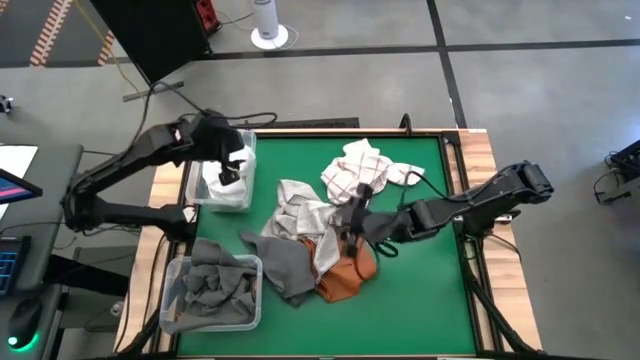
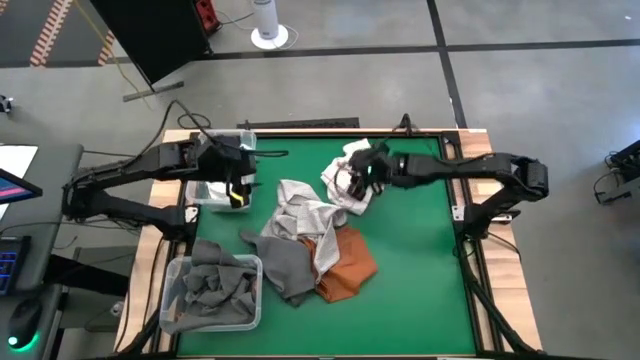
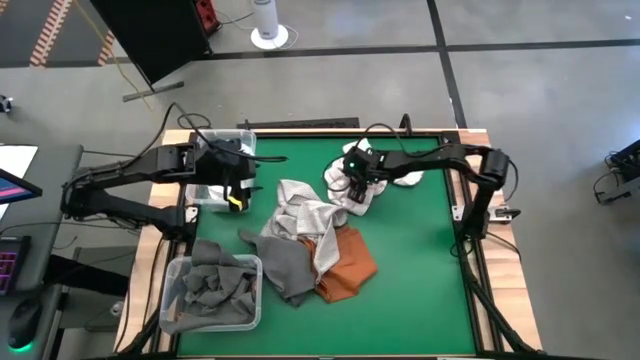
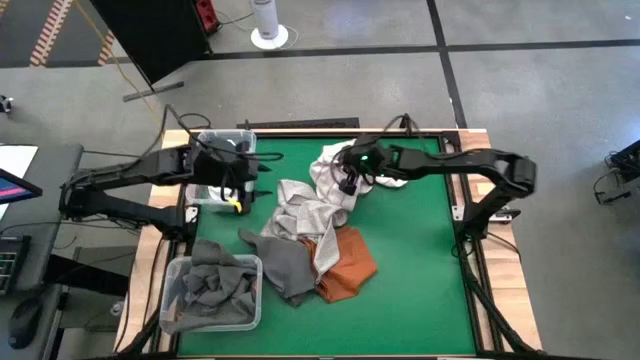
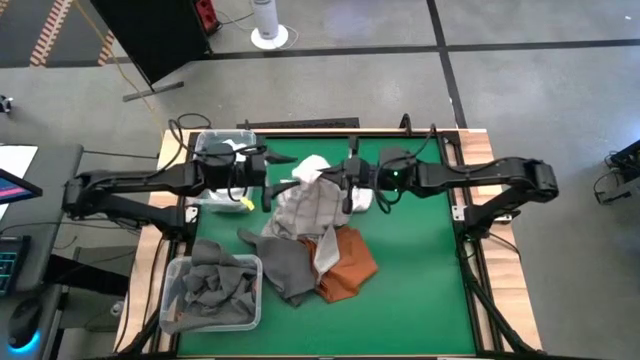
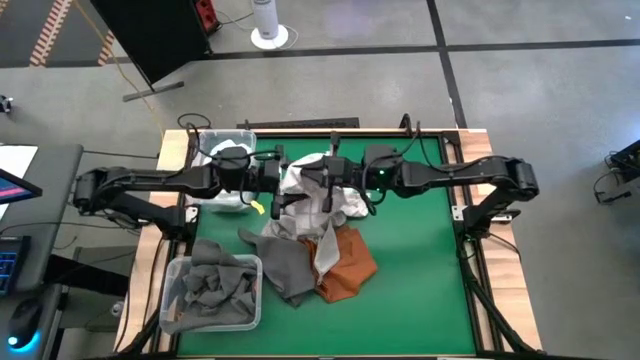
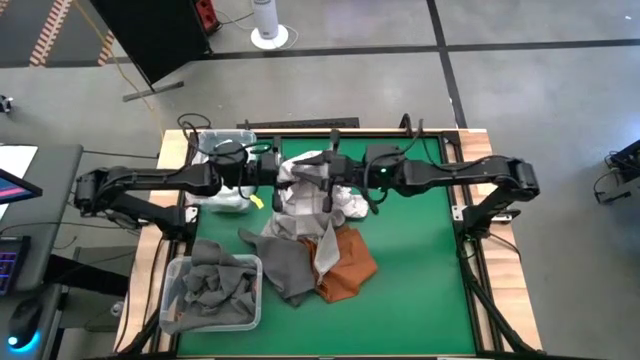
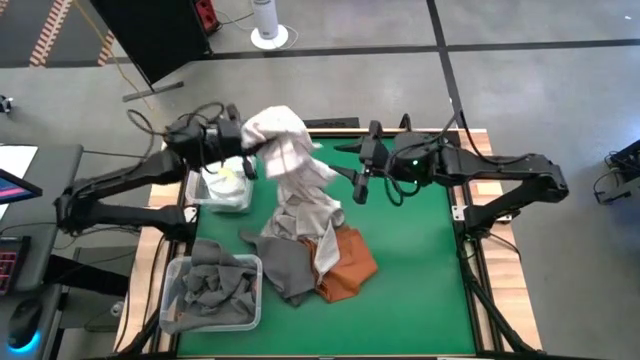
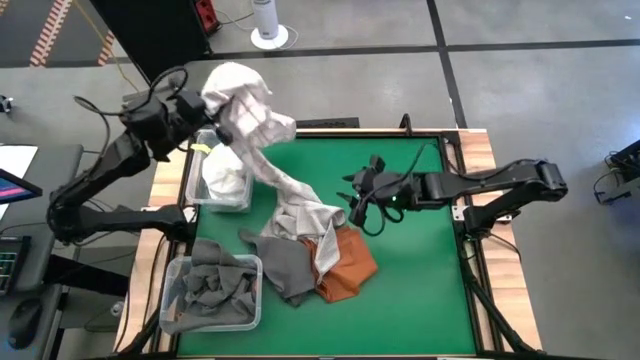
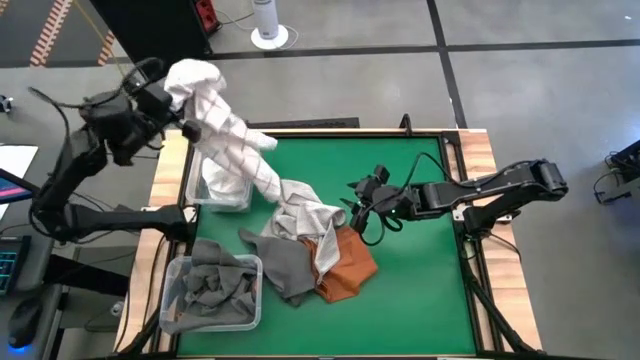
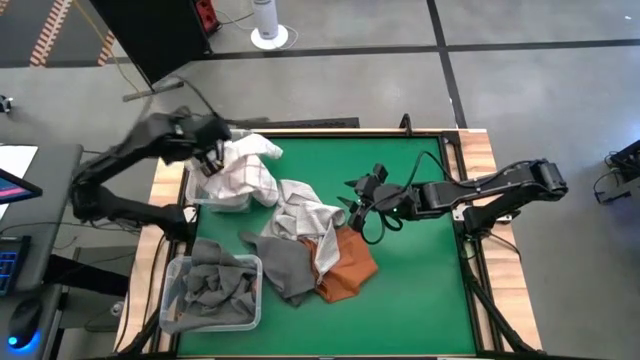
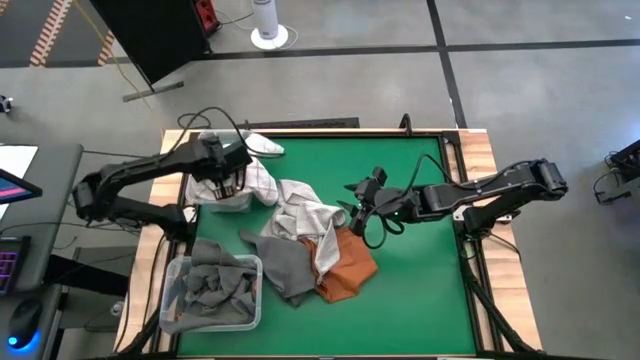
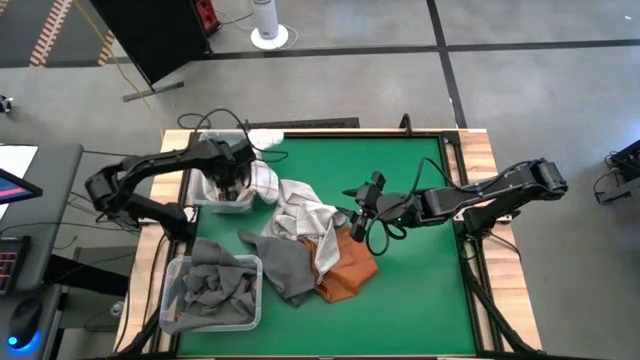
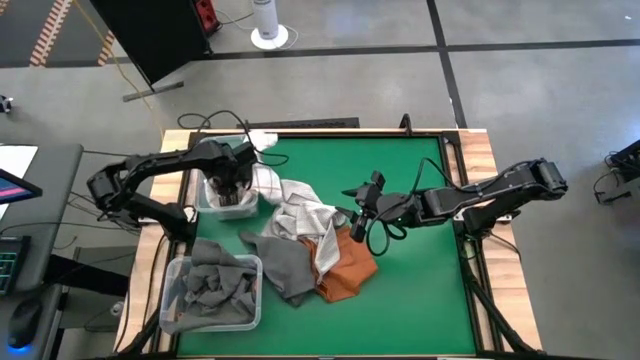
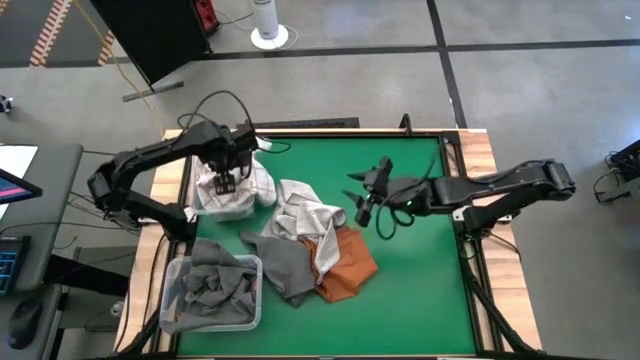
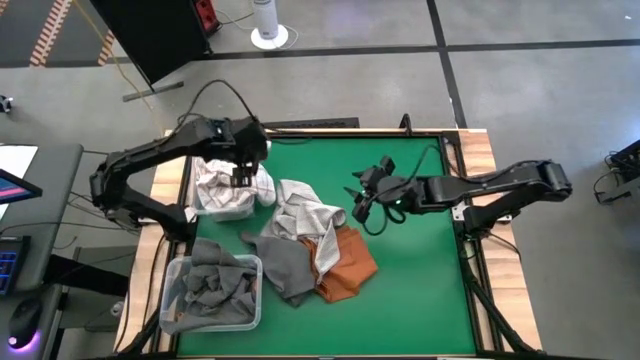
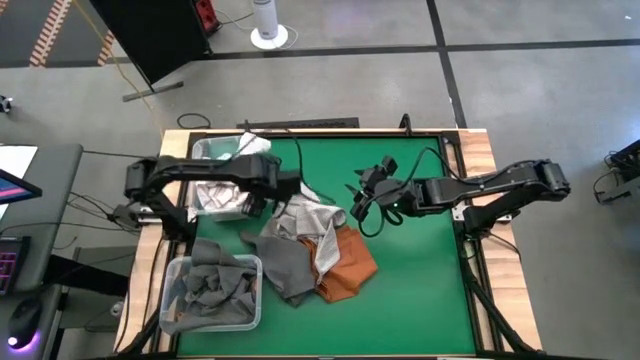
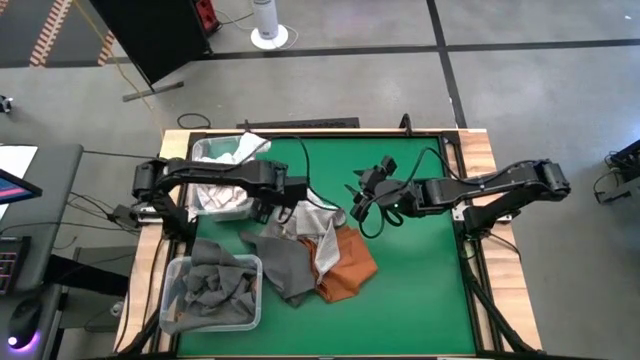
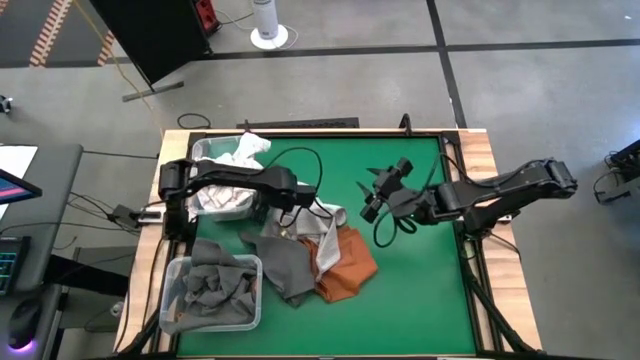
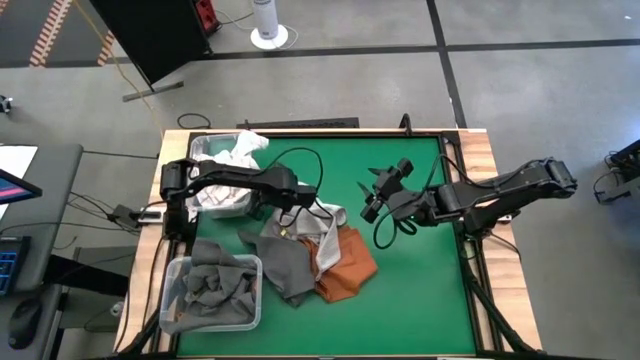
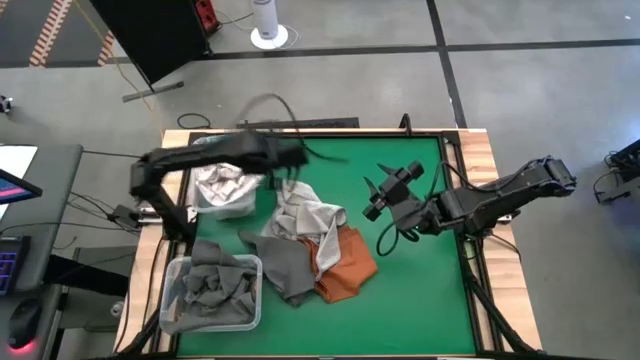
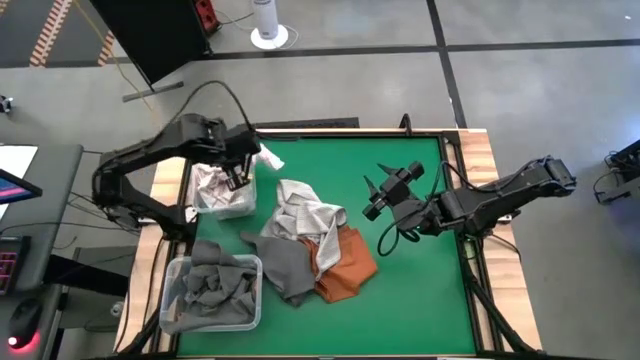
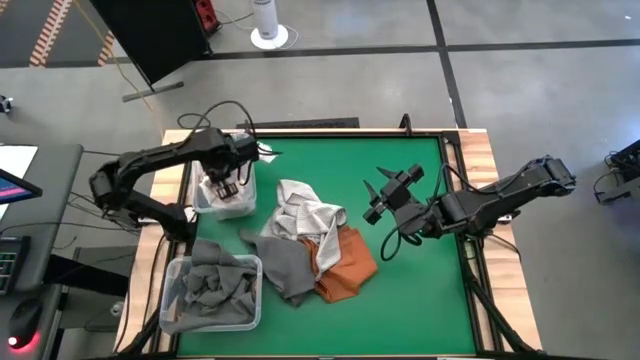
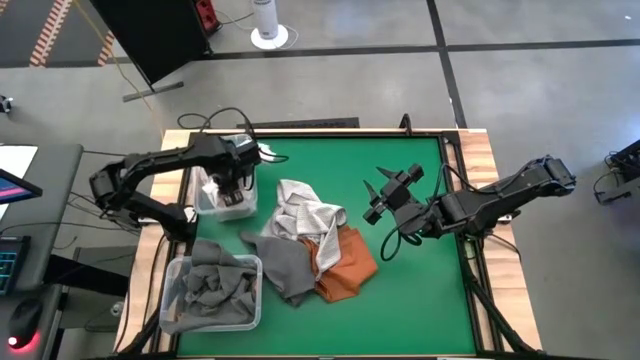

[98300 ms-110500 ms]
Task: Sort towels by color in basket
Put the white patterned towel into the top transparent bin

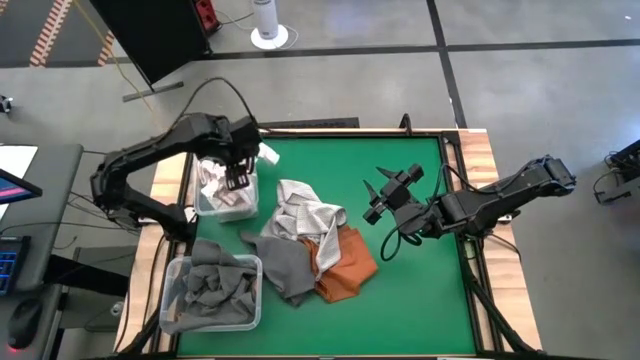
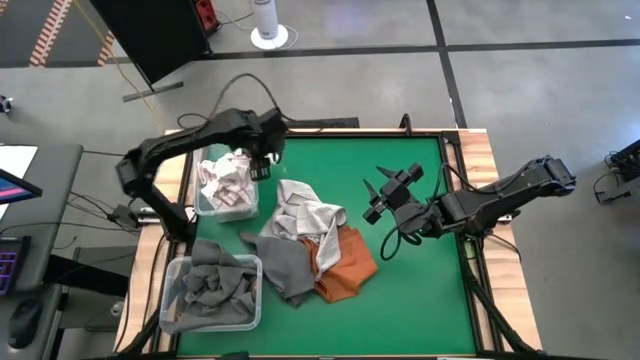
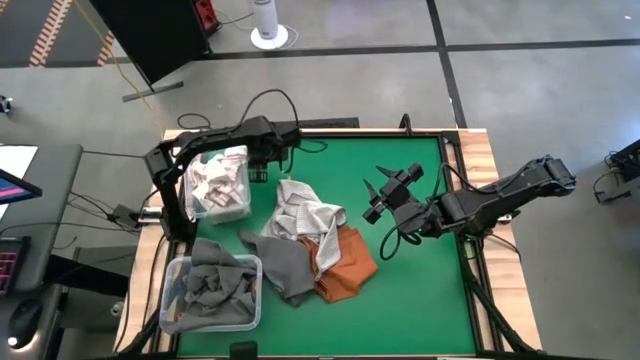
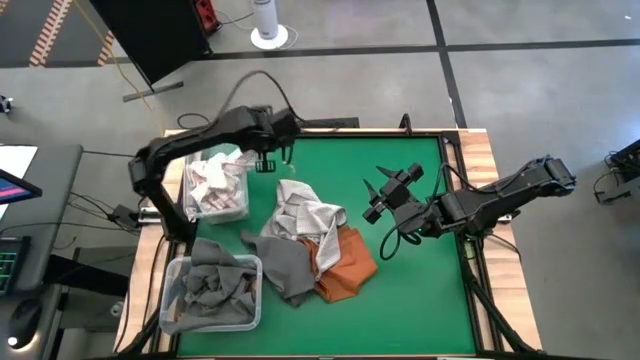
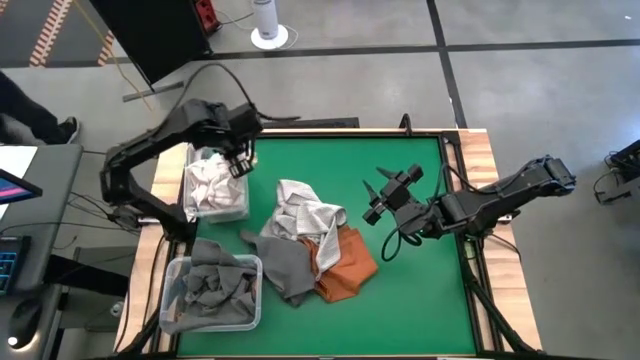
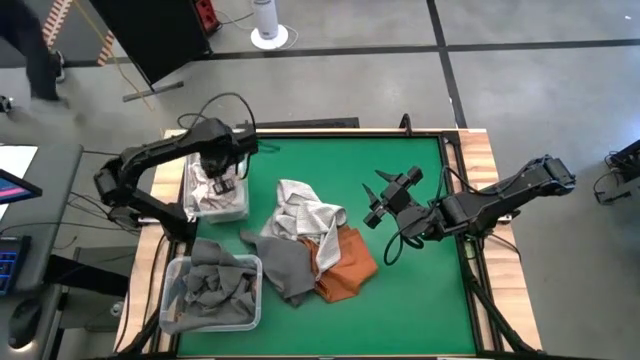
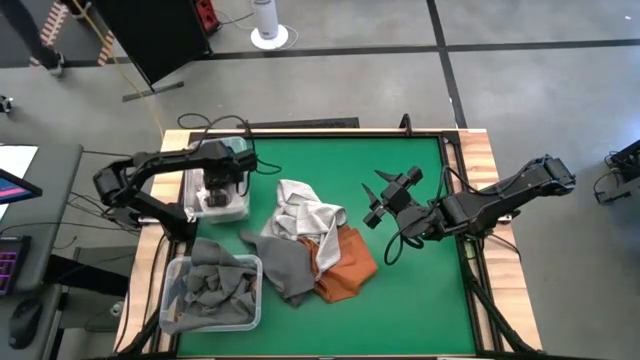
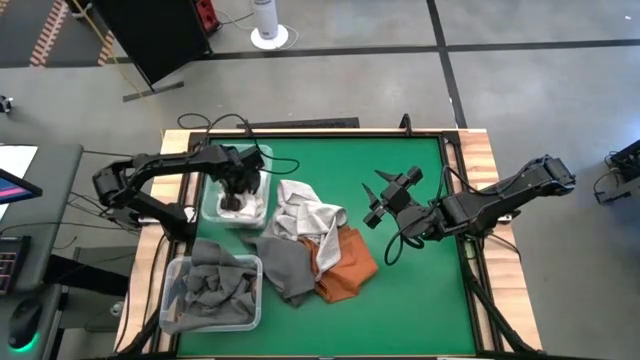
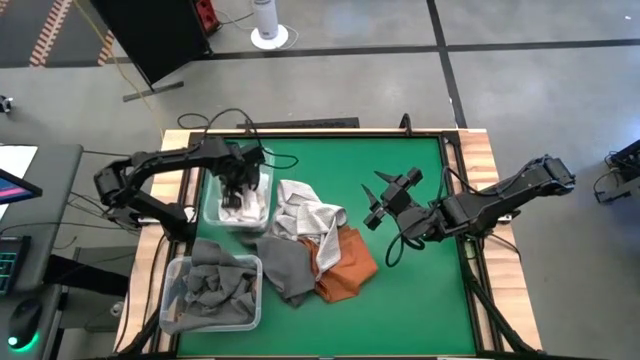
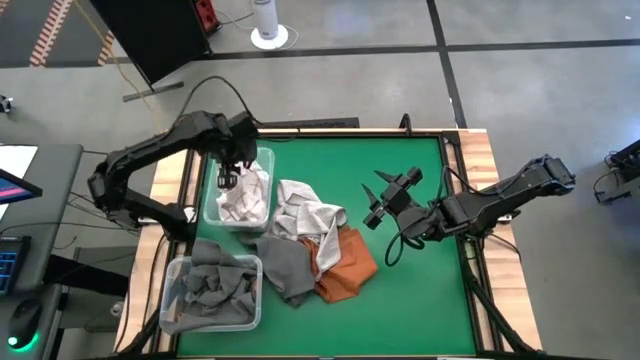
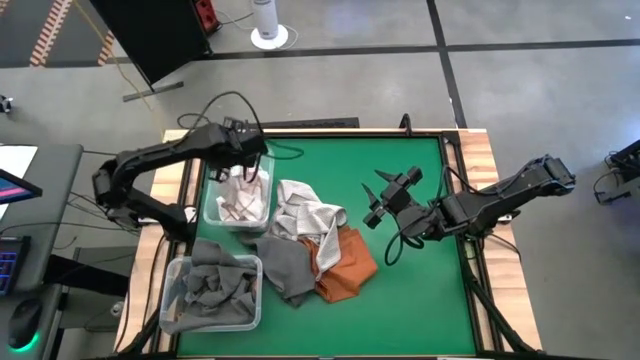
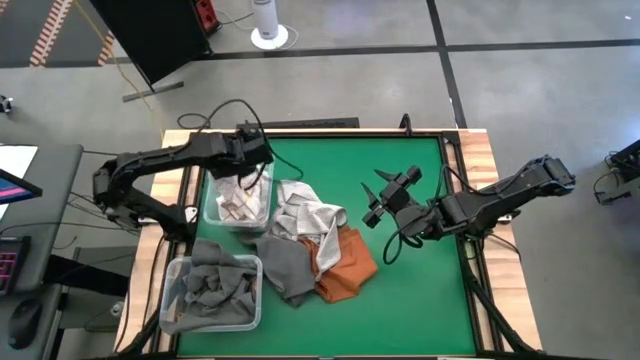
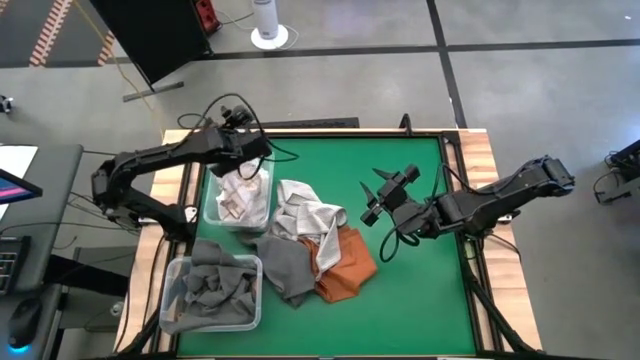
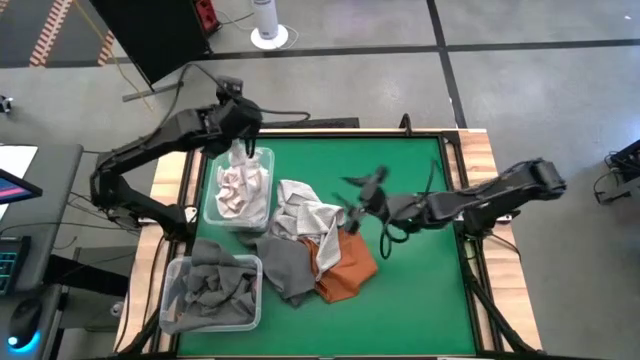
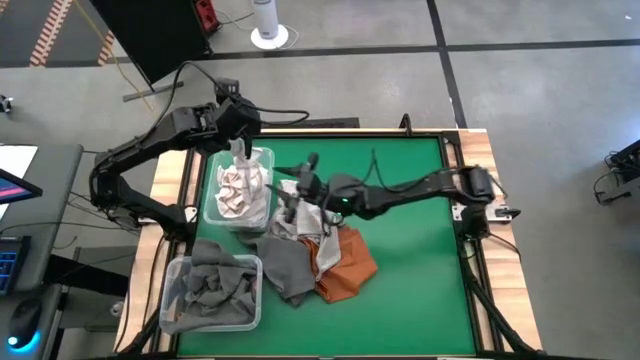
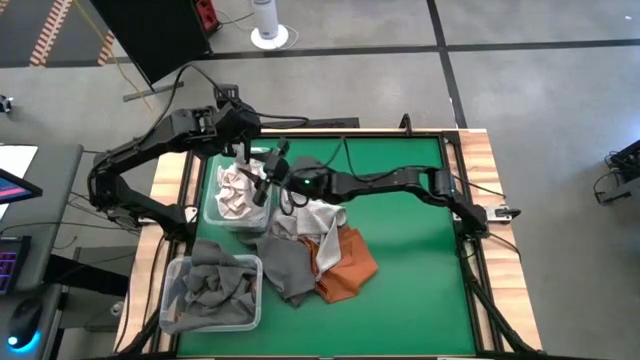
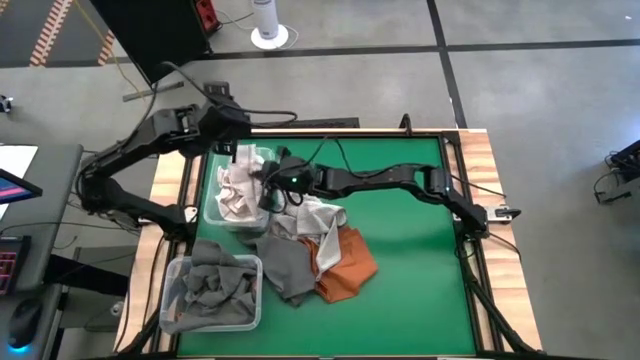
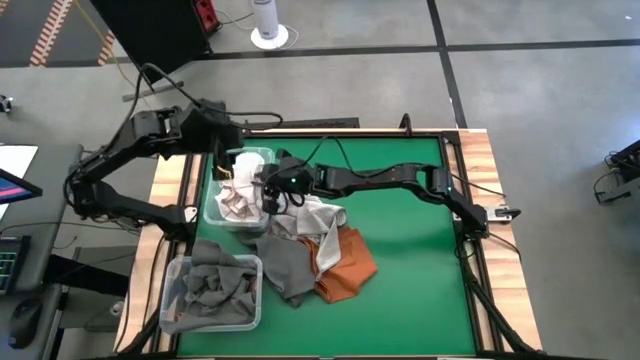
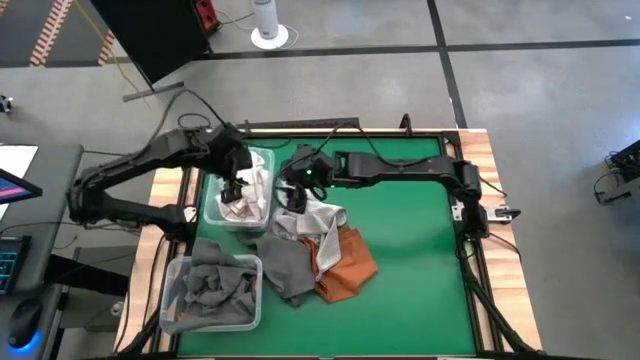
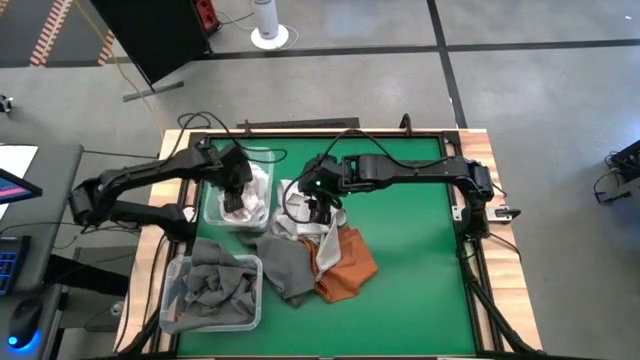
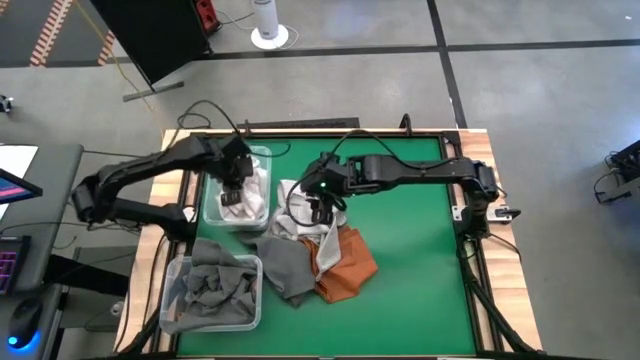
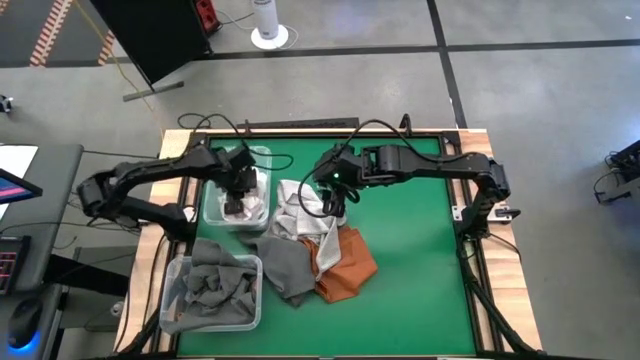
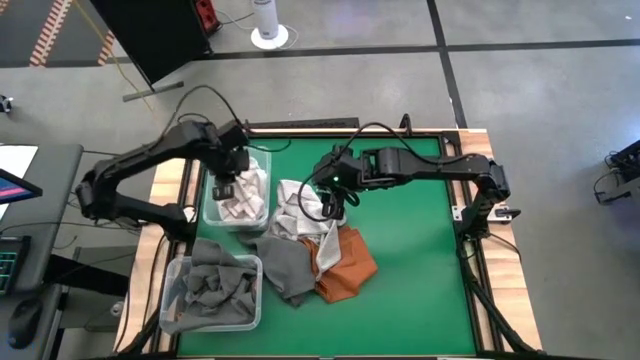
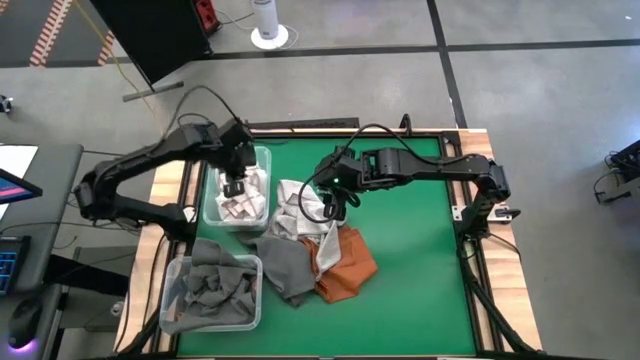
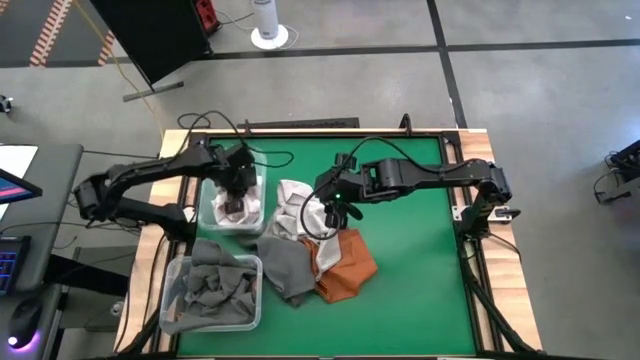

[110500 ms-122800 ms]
Put the white patterned towel into the top transparent bin
